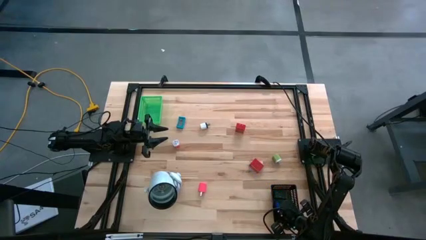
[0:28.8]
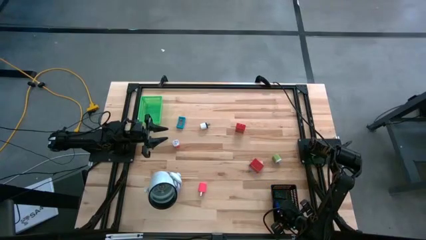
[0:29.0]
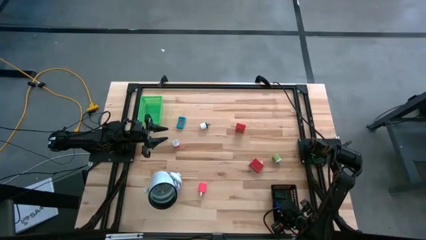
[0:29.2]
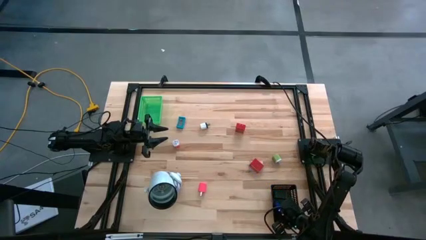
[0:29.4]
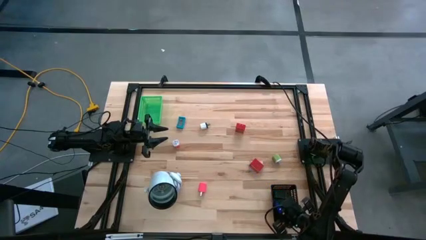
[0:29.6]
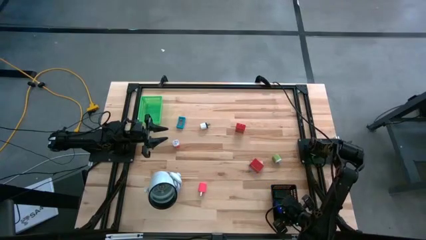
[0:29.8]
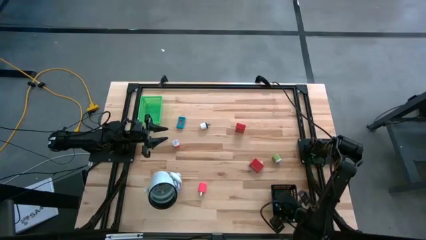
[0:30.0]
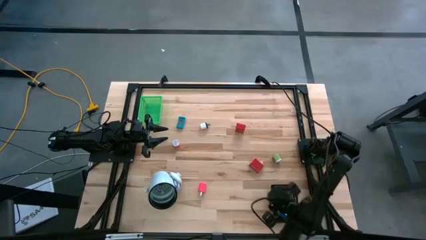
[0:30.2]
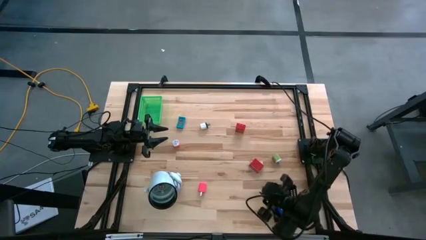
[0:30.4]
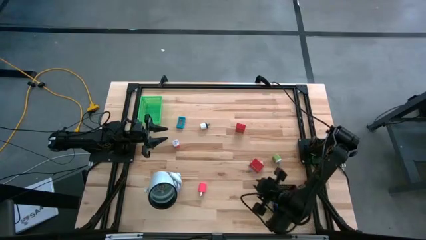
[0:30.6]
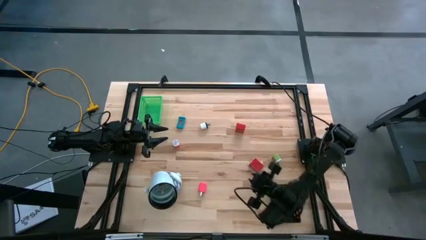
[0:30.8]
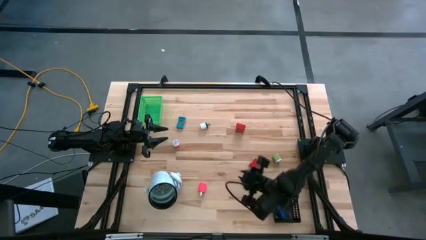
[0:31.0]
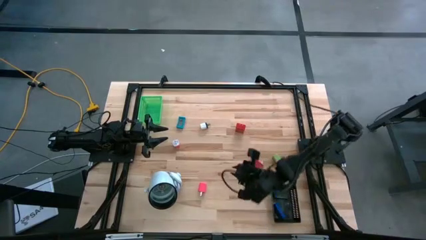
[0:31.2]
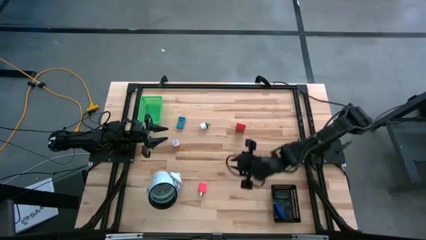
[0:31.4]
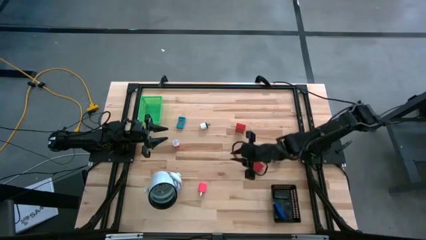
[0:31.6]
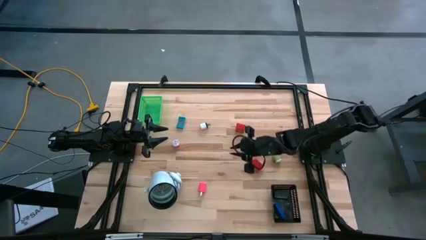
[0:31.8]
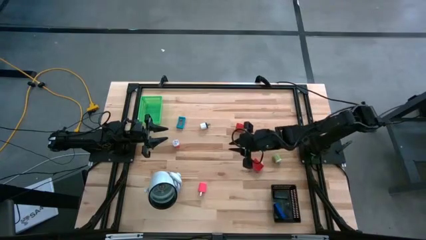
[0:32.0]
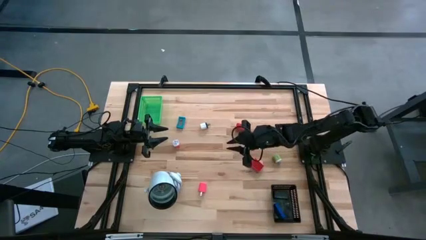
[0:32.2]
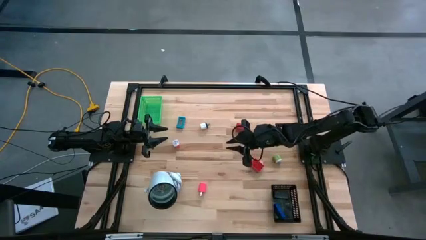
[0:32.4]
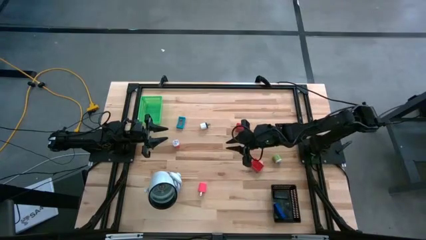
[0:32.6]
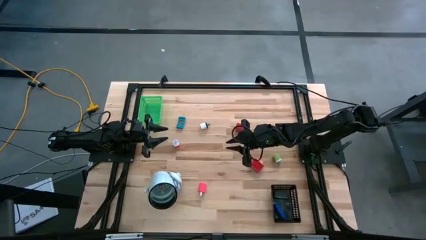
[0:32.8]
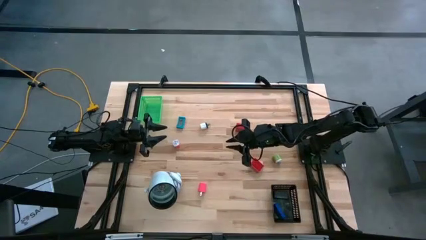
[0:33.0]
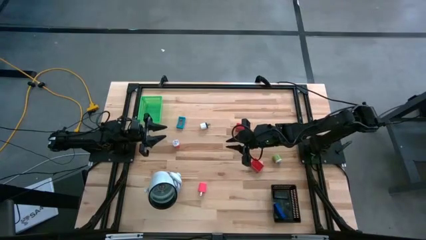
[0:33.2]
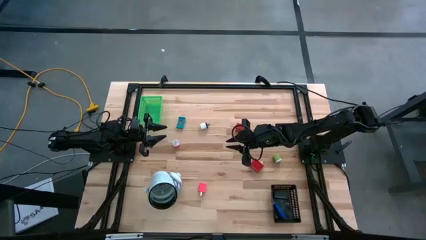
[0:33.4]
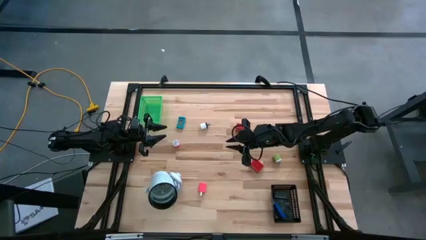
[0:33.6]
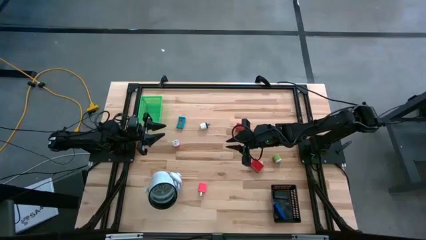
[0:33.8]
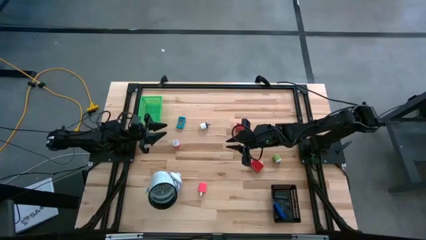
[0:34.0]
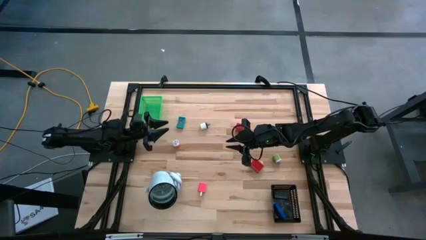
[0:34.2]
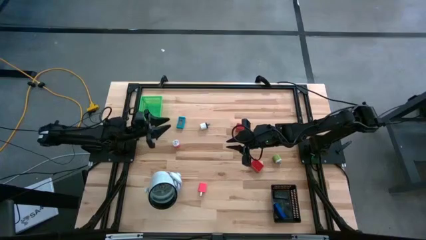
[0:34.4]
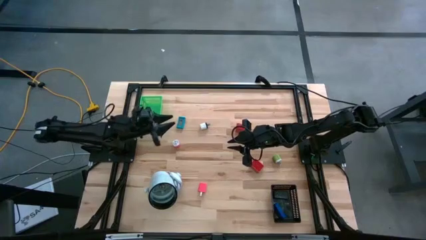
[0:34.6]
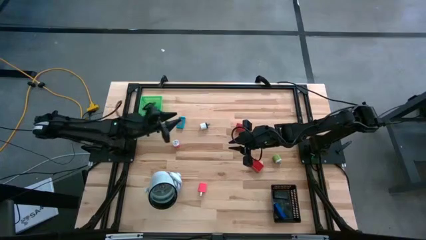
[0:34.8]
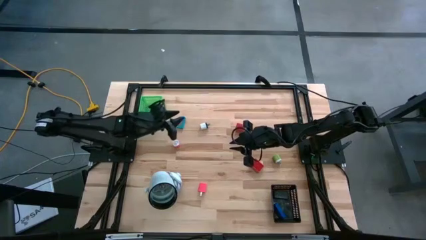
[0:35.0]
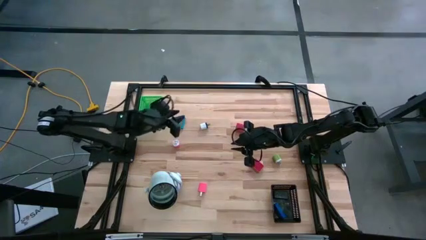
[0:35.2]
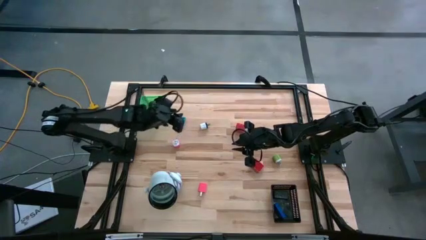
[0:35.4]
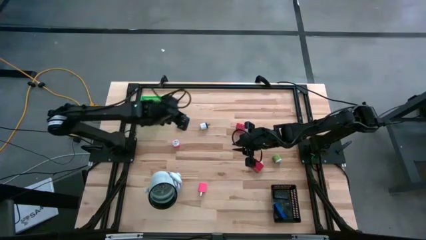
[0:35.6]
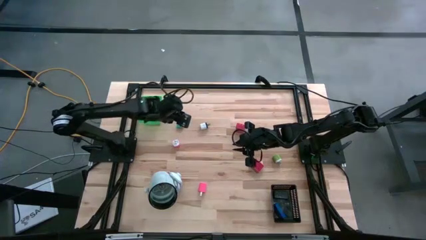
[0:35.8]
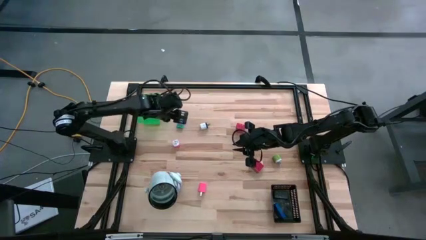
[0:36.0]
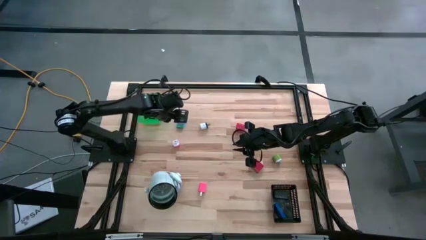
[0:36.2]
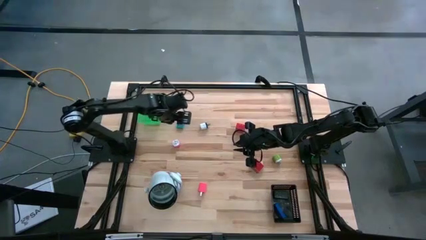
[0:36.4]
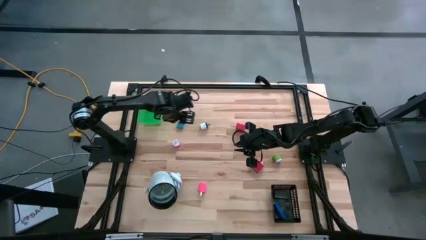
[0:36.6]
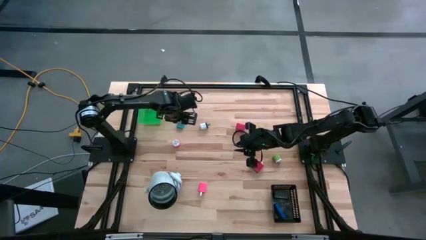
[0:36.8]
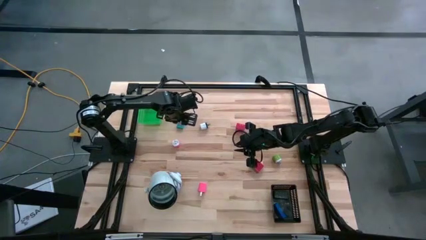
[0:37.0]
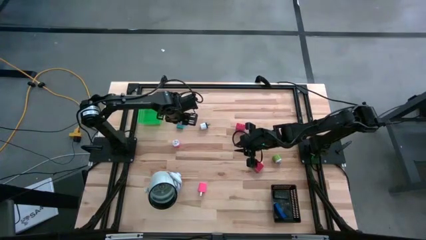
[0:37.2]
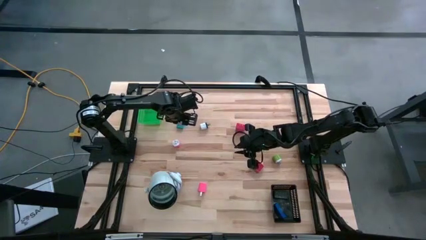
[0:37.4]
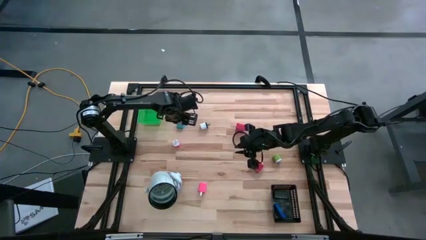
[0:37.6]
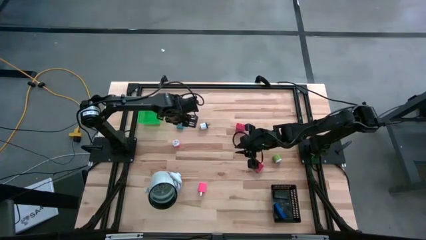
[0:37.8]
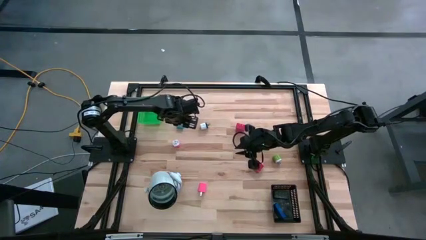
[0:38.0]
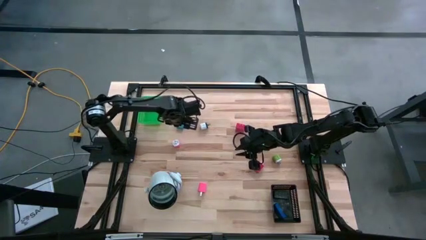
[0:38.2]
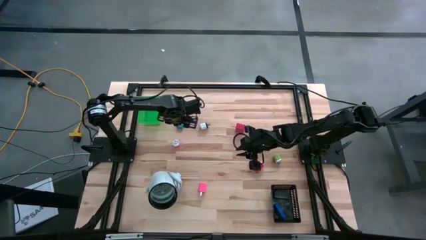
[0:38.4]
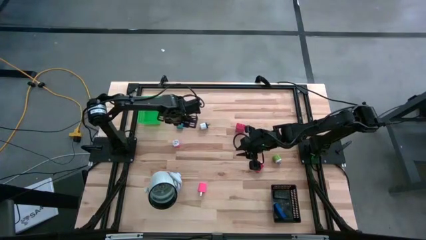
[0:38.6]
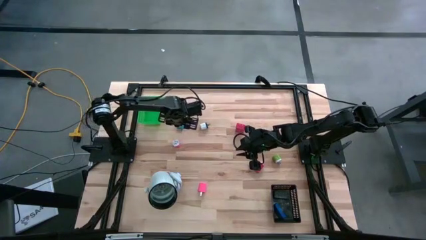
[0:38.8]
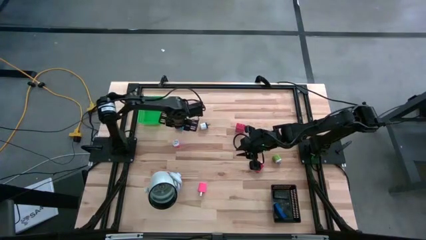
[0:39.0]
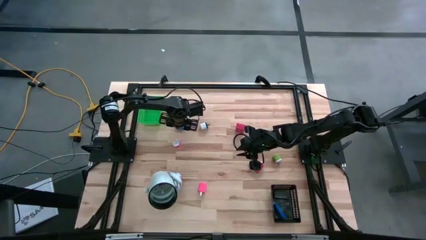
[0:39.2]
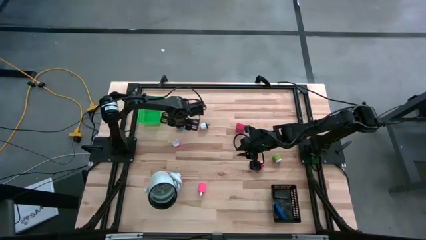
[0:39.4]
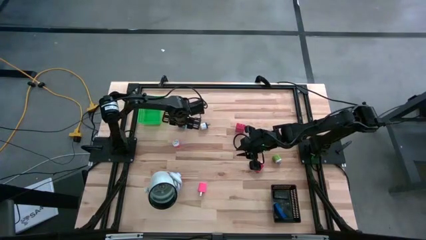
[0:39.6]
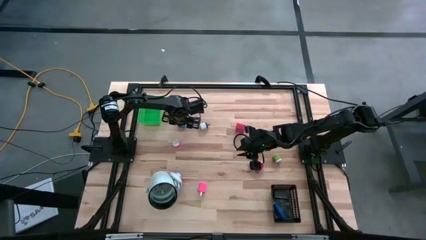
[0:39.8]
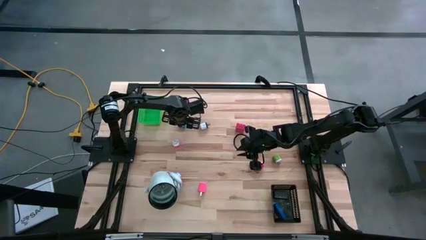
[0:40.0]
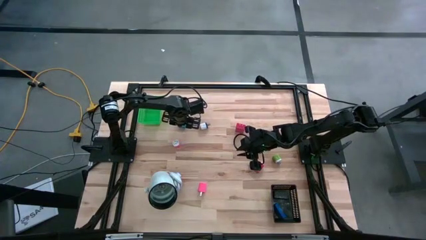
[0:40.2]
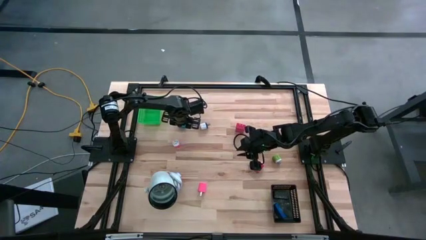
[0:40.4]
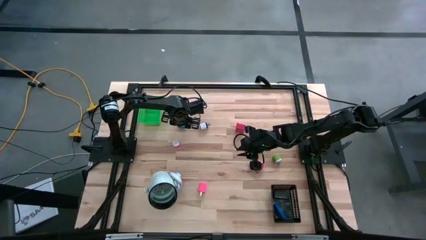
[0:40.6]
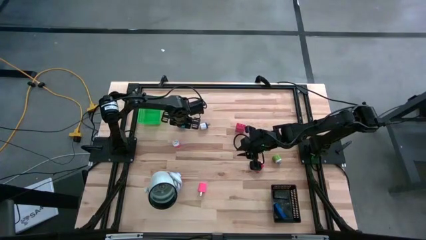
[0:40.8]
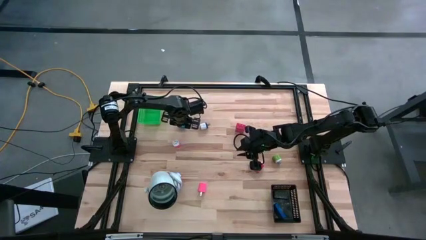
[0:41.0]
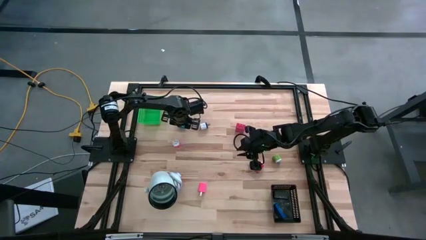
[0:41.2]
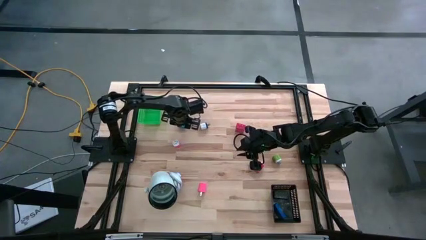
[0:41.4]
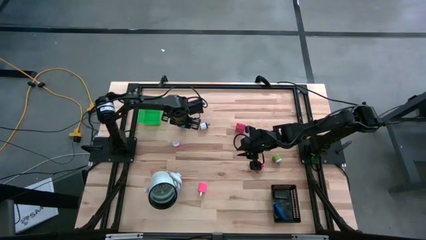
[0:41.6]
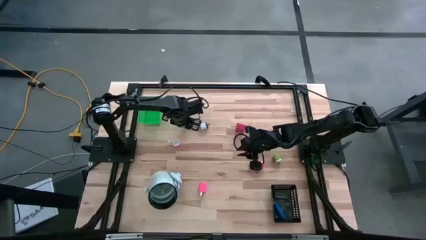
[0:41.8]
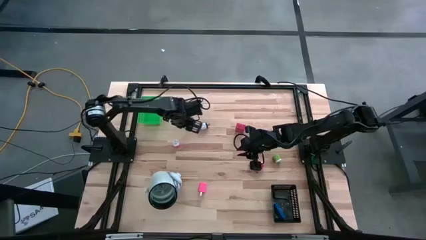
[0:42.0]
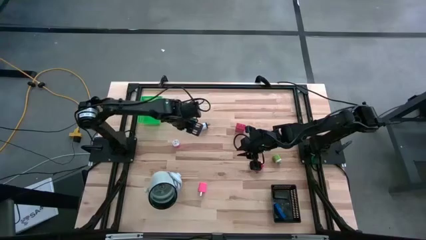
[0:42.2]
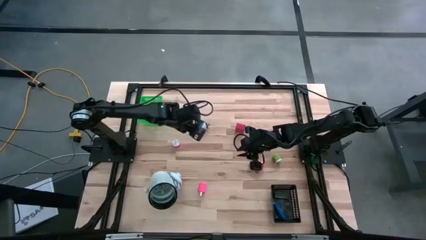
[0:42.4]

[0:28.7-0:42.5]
Task: Pick & Place Office items
Put the light blue digital clock into the black bin
